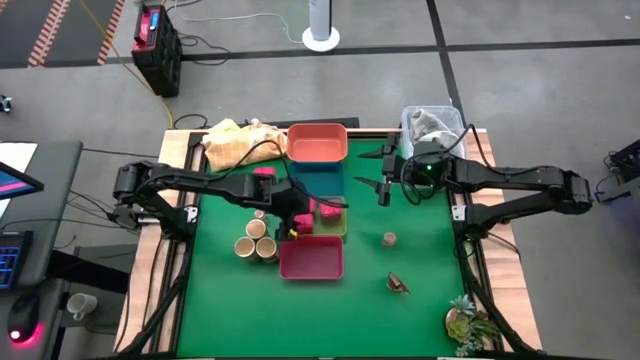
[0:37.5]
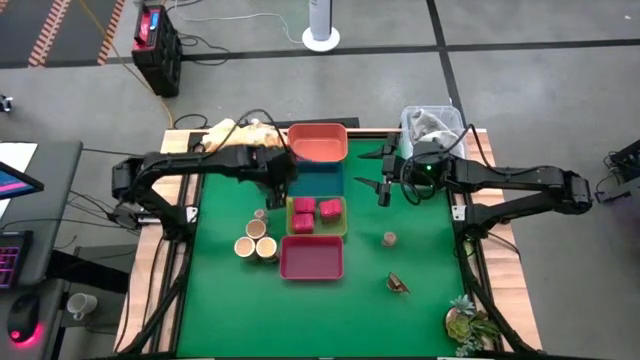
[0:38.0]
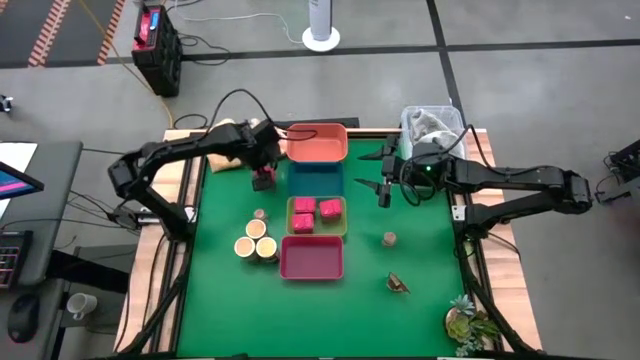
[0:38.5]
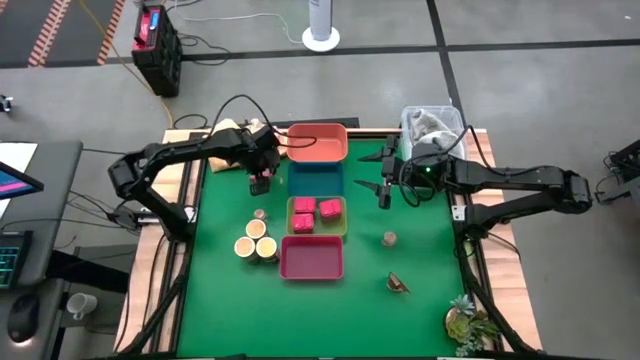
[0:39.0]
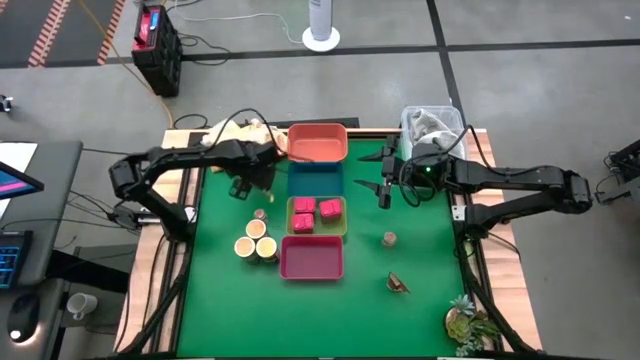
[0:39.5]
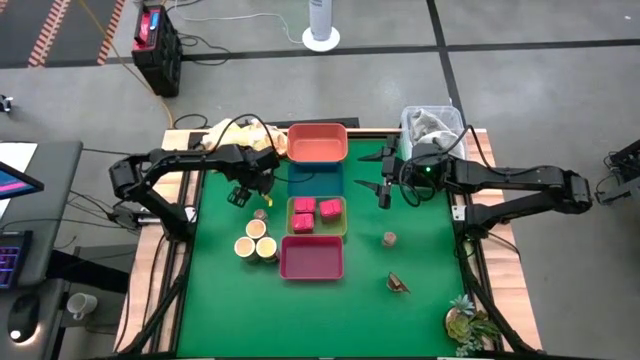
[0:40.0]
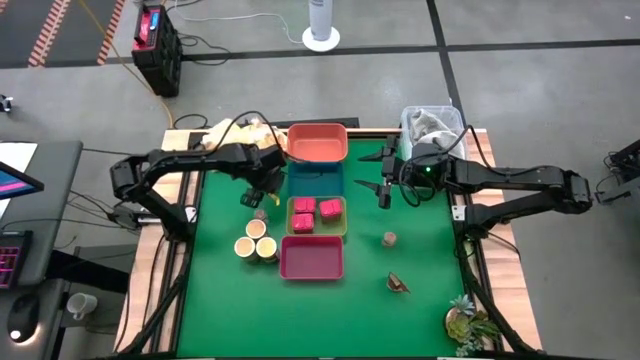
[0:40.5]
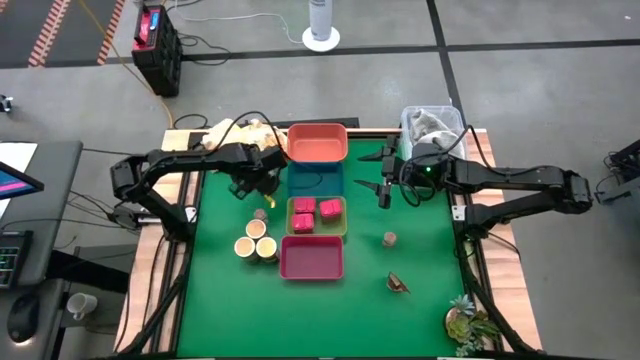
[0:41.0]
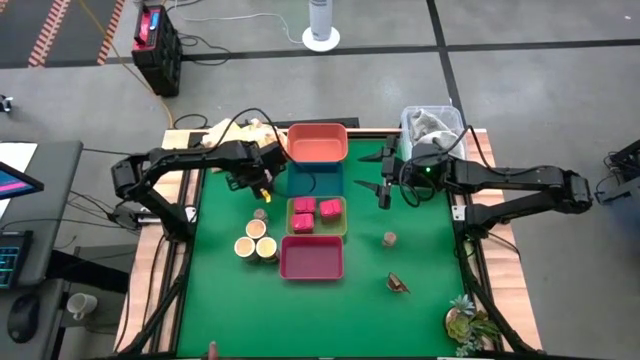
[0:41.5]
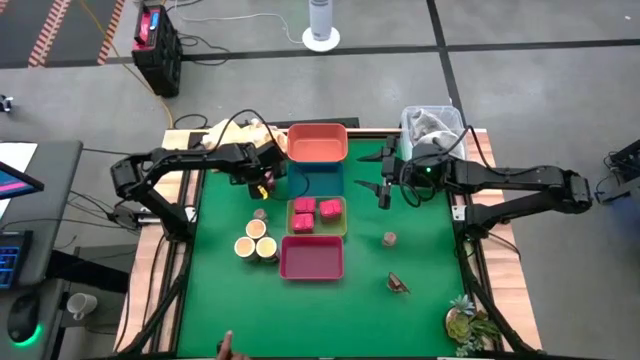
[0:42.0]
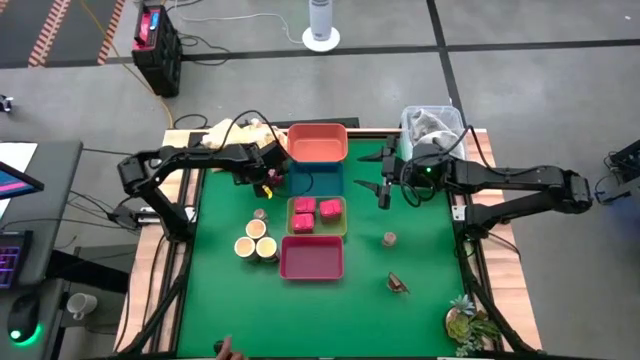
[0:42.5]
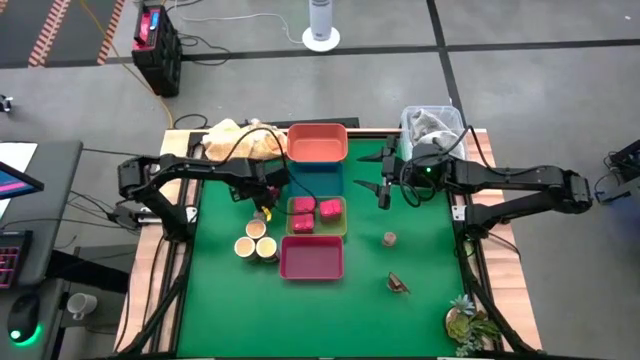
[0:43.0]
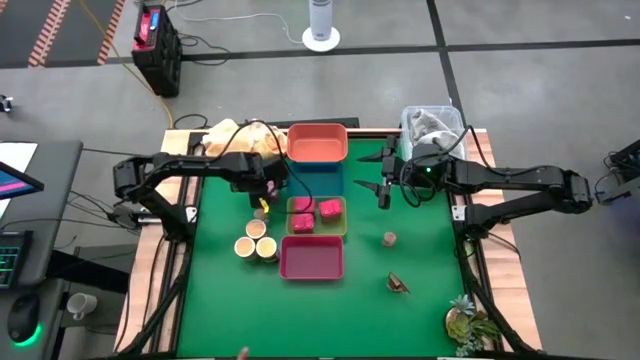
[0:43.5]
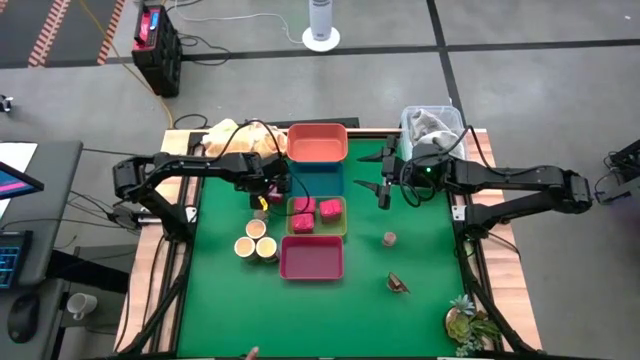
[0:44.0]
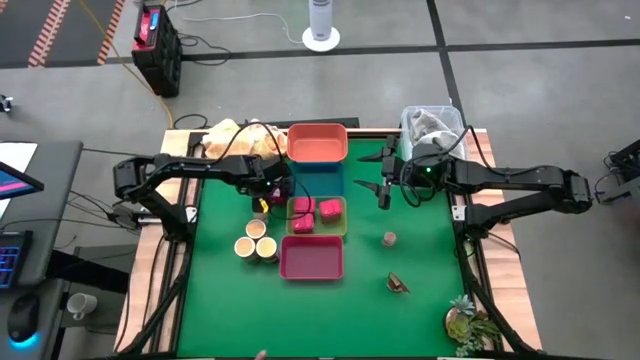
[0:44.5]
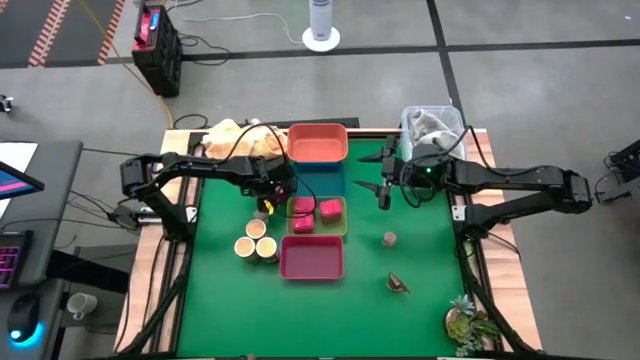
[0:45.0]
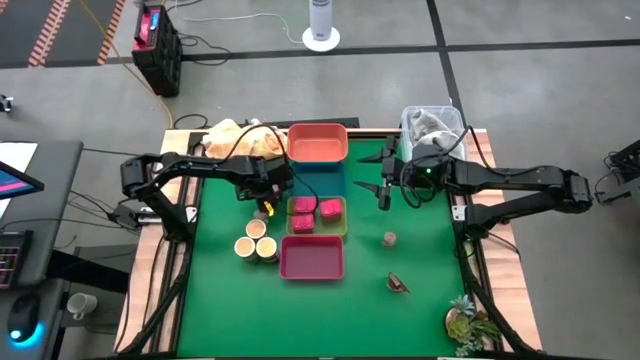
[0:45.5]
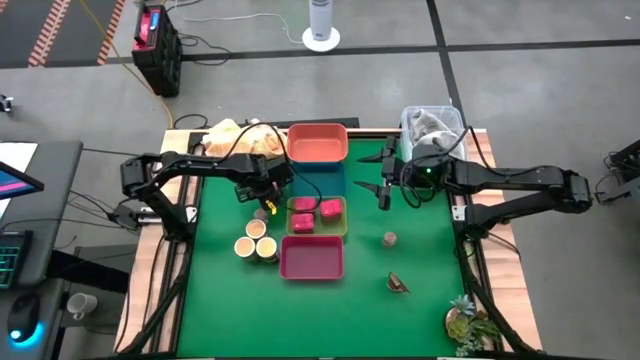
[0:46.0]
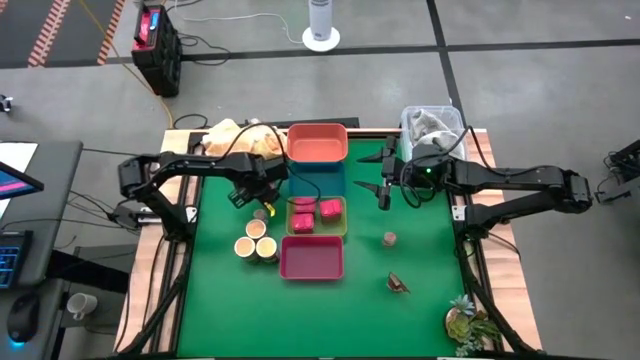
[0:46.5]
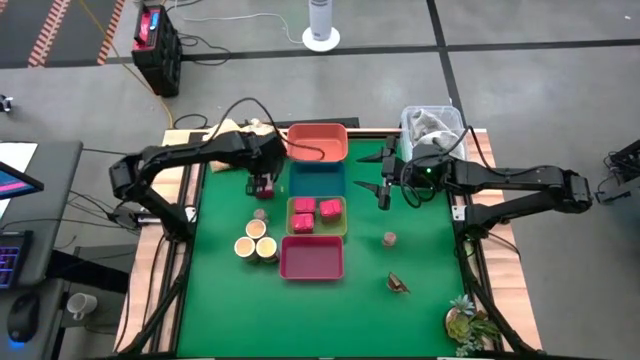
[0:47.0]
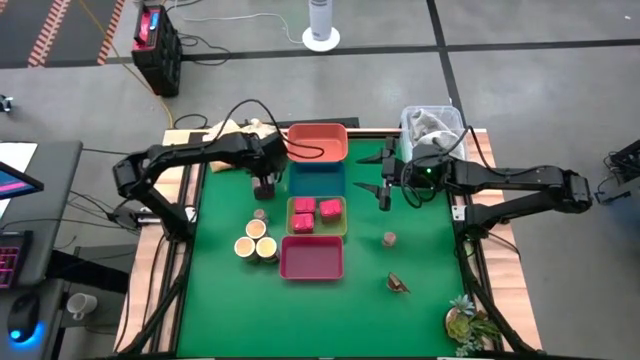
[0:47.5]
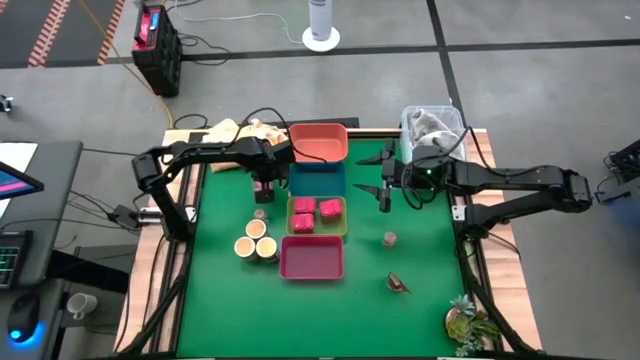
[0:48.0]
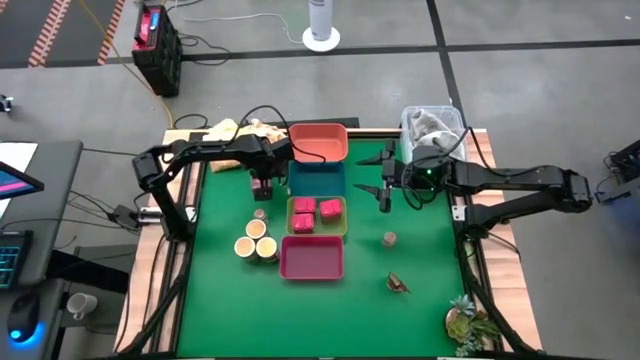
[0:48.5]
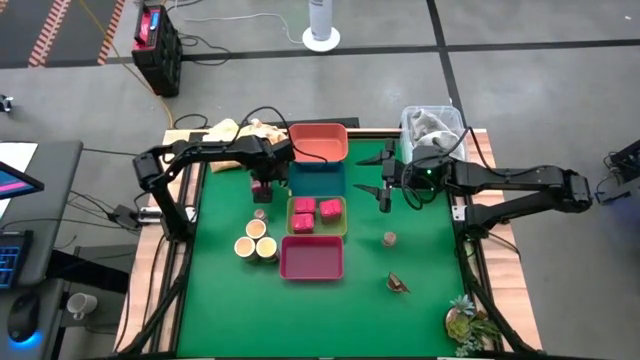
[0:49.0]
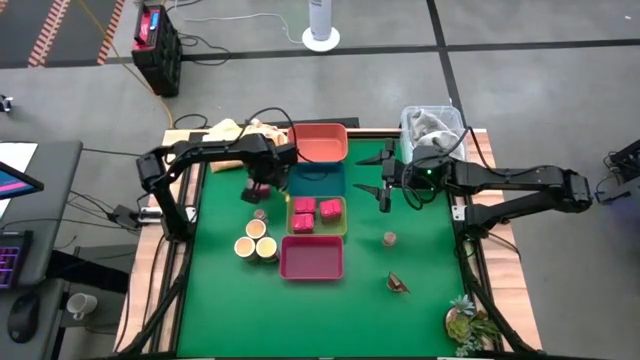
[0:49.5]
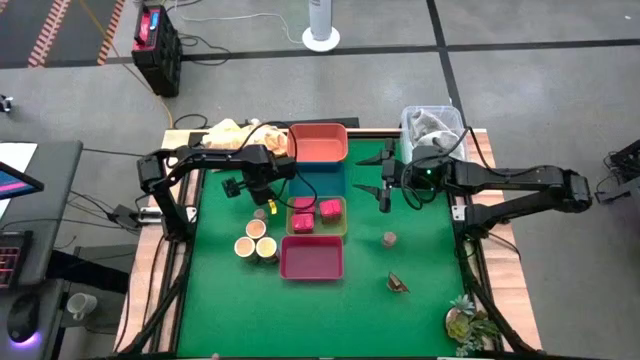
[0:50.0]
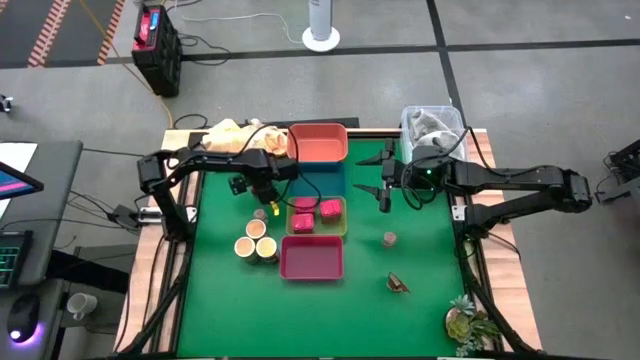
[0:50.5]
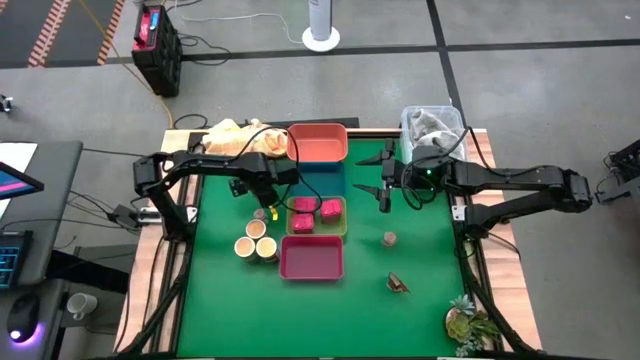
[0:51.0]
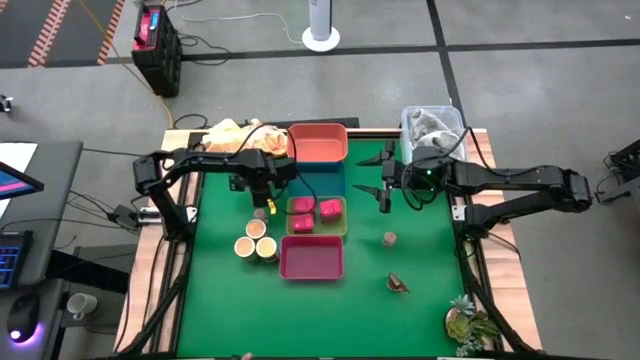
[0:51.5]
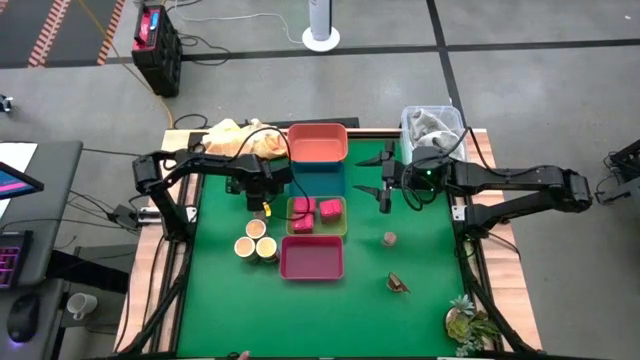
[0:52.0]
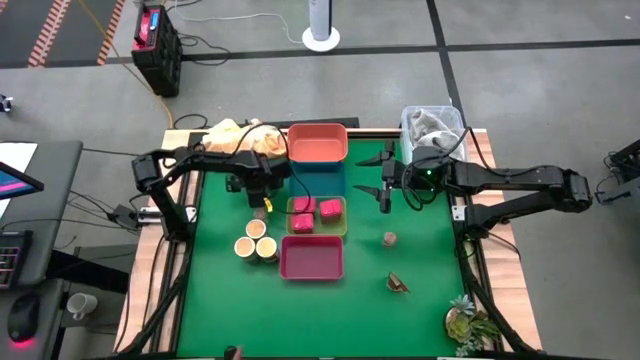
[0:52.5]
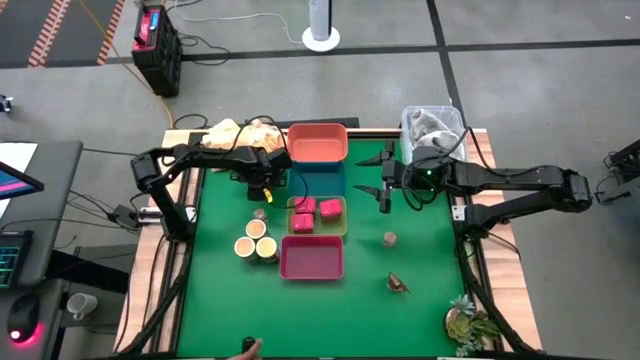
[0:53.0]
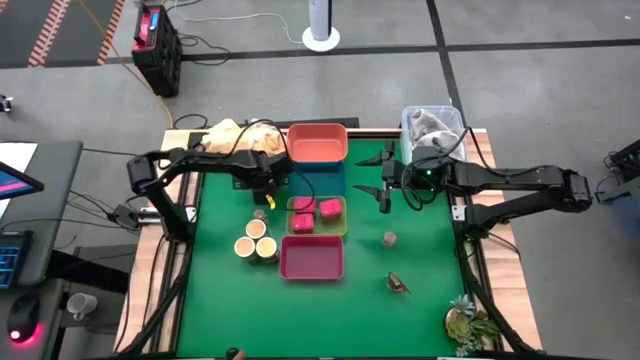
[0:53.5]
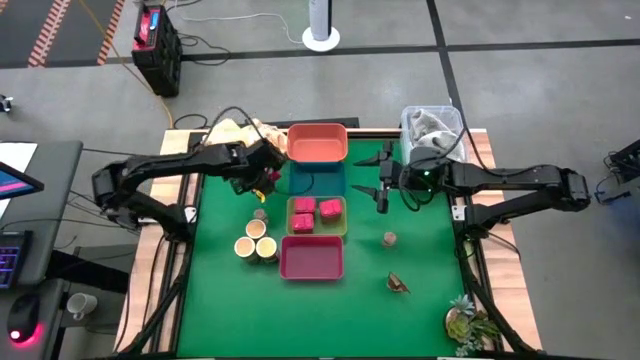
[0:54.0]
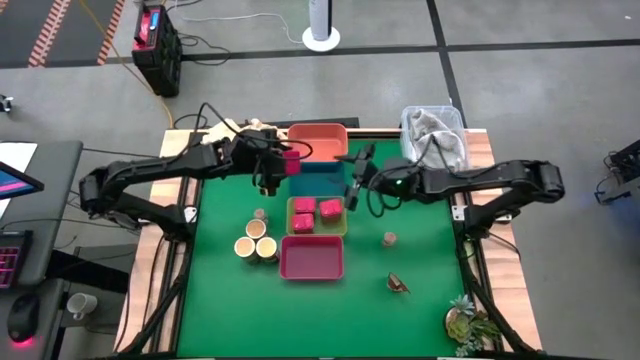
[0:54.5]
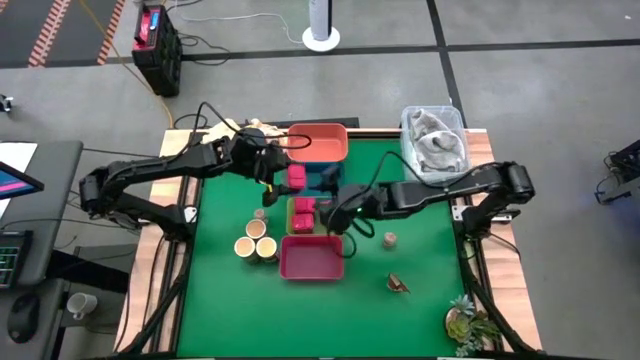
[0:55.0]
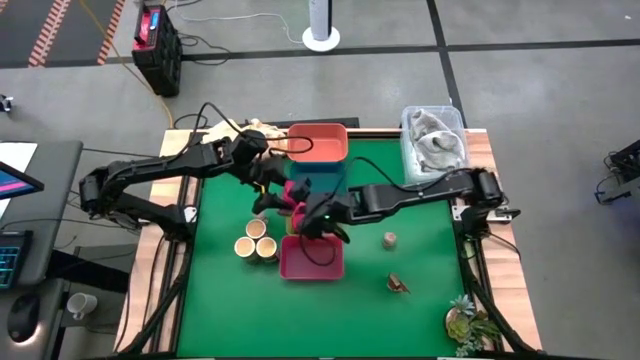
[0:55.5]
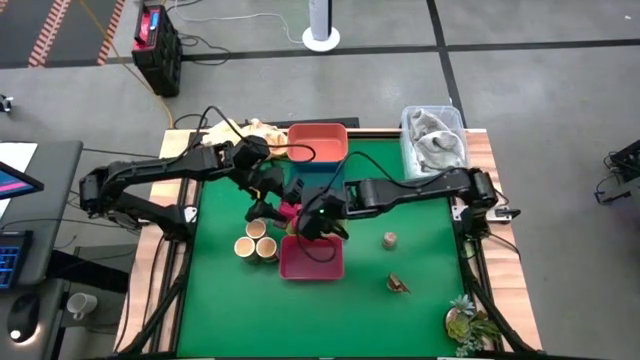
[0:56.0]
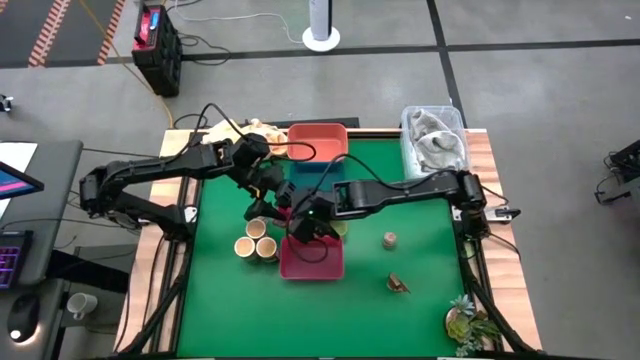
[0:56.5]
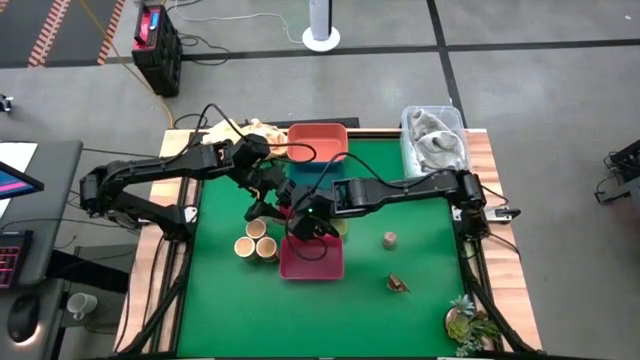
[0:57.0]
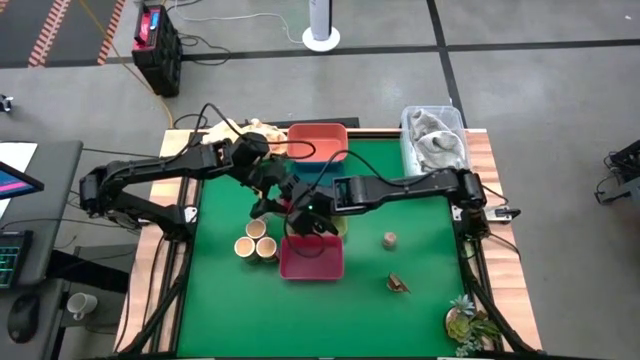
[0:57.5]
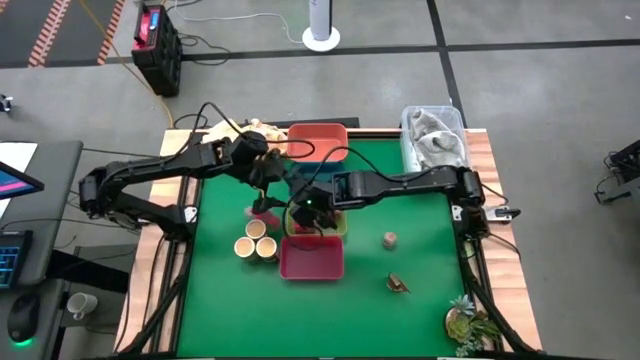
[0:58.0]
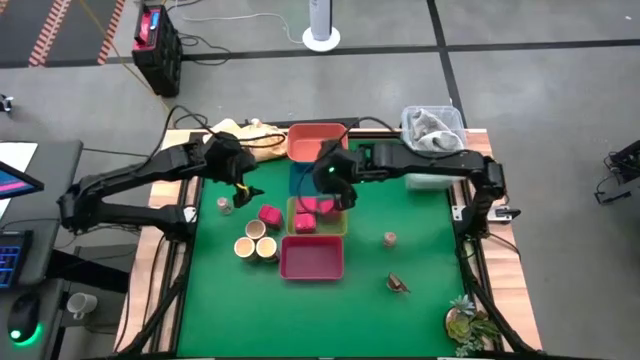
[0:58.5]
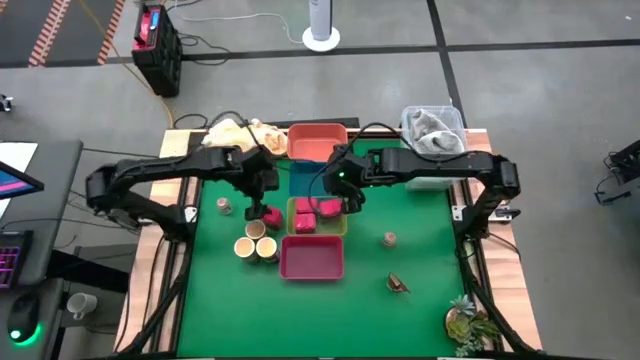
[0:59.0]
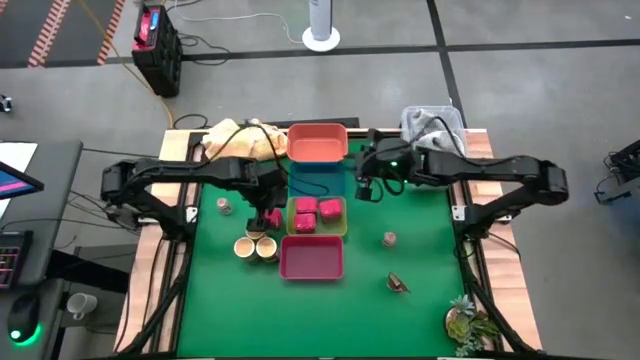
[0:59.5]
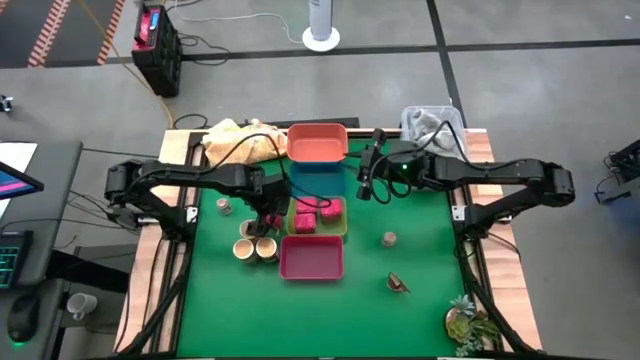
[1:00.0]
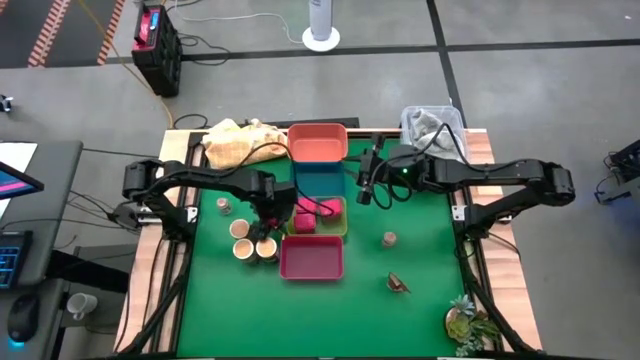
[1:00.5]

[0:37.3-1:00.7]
Task: Sort spices by type
Put the red seasoning bottle into the green bin
